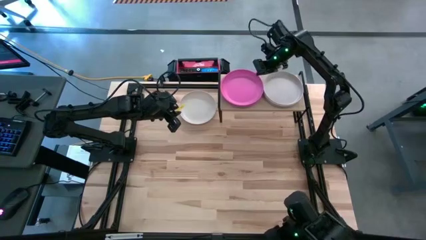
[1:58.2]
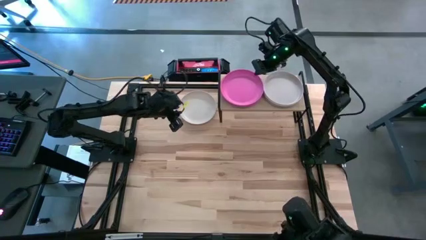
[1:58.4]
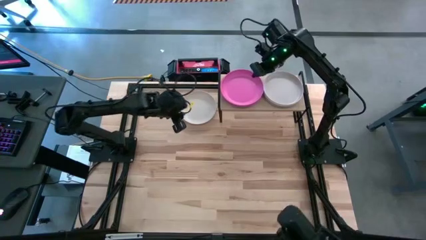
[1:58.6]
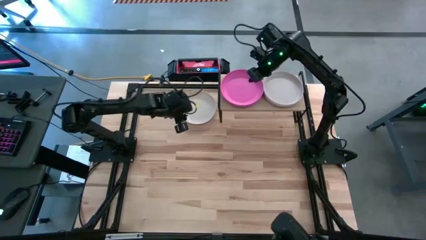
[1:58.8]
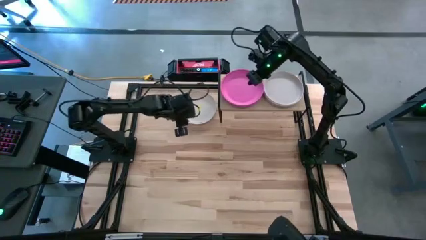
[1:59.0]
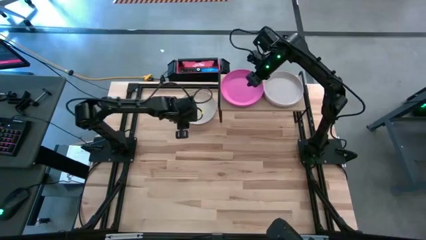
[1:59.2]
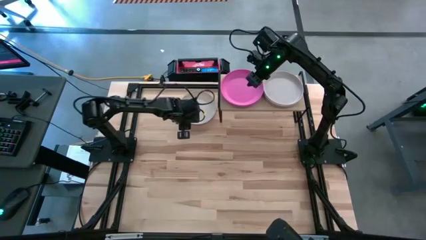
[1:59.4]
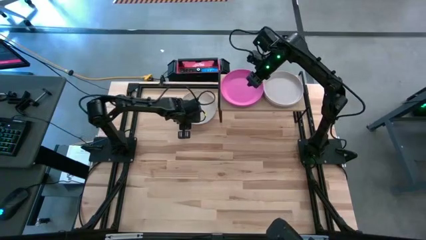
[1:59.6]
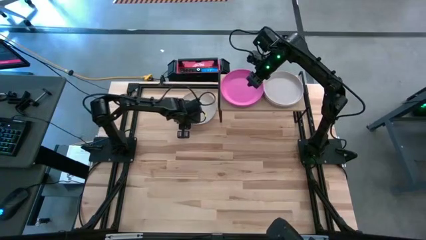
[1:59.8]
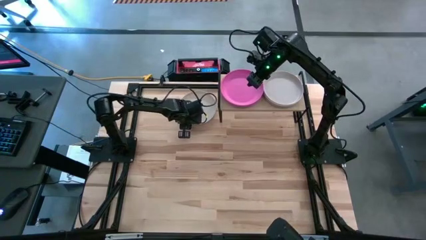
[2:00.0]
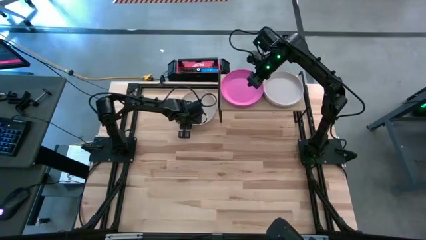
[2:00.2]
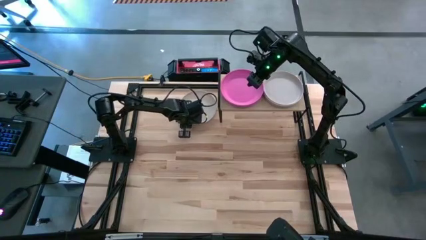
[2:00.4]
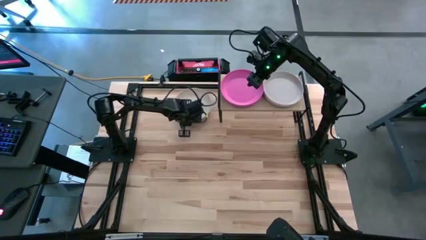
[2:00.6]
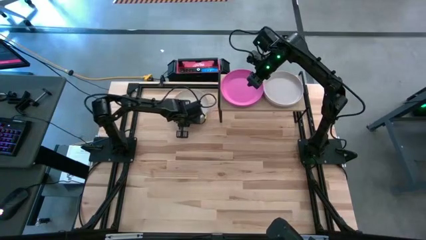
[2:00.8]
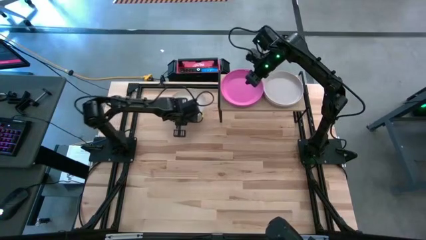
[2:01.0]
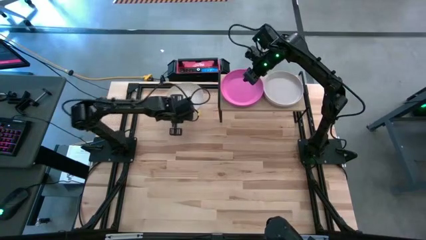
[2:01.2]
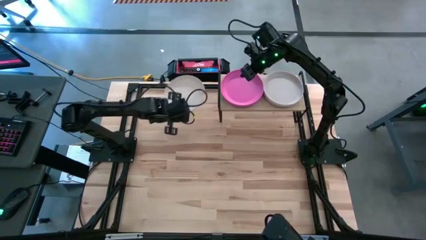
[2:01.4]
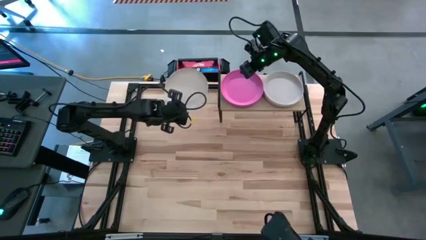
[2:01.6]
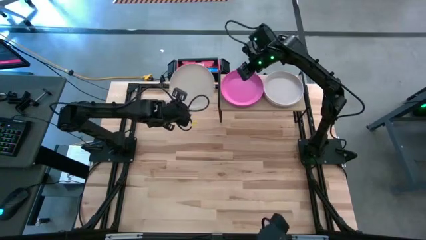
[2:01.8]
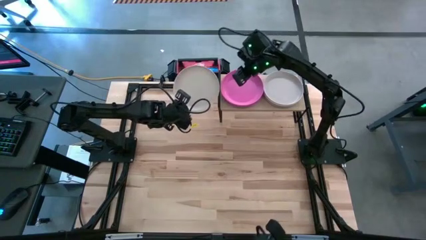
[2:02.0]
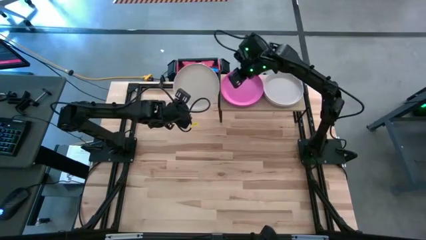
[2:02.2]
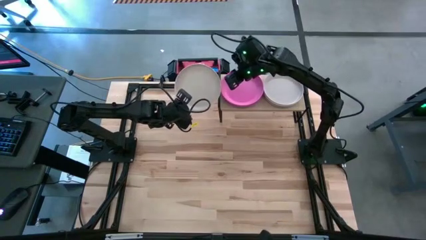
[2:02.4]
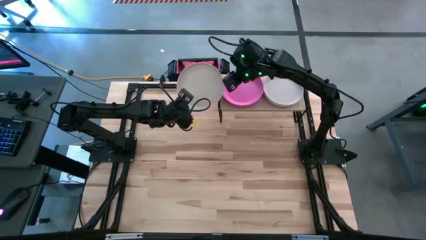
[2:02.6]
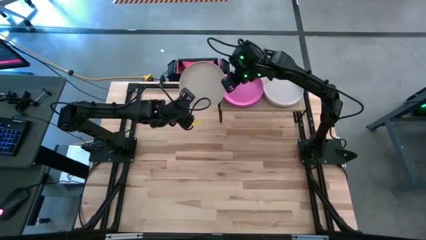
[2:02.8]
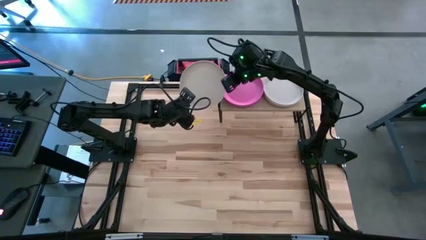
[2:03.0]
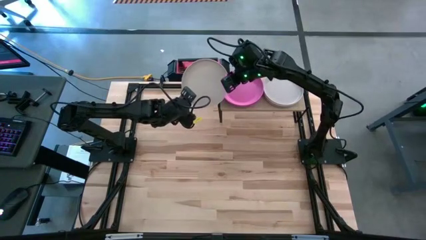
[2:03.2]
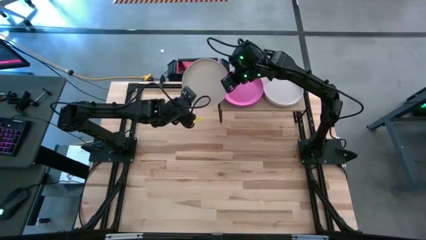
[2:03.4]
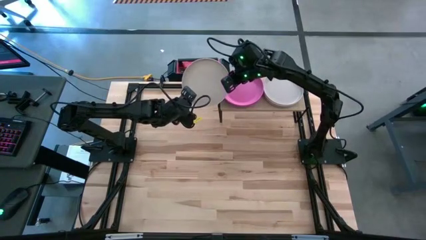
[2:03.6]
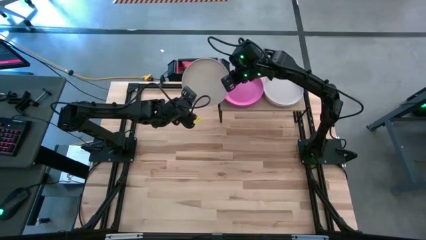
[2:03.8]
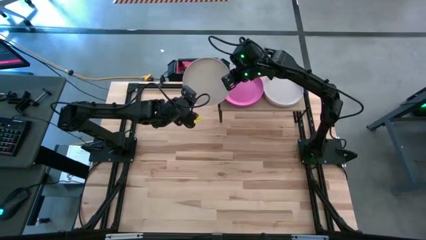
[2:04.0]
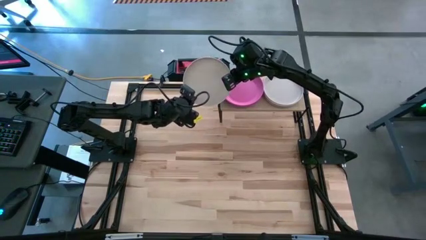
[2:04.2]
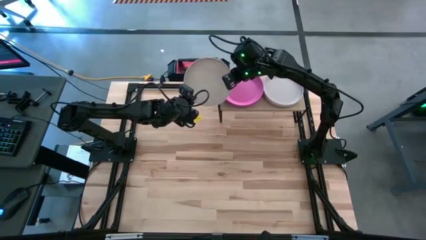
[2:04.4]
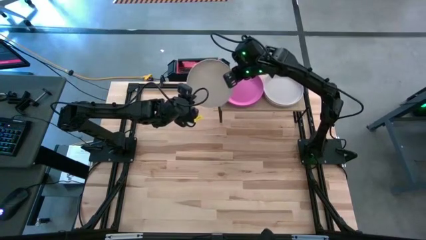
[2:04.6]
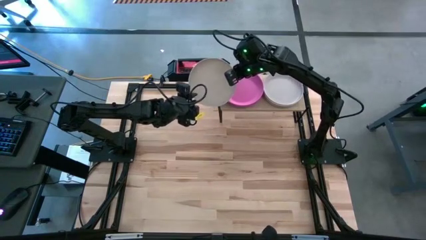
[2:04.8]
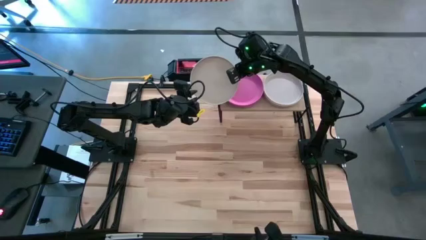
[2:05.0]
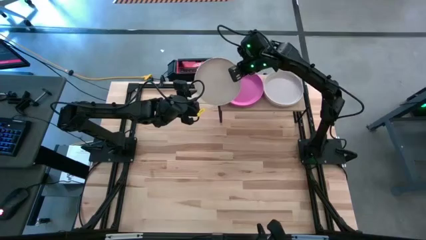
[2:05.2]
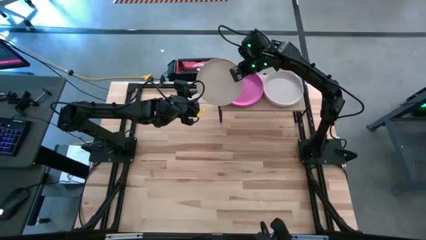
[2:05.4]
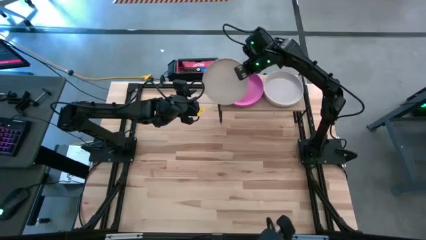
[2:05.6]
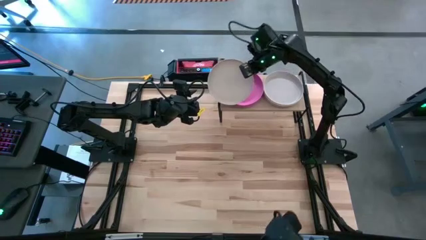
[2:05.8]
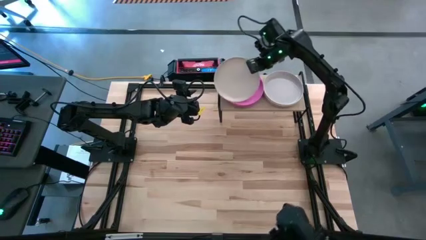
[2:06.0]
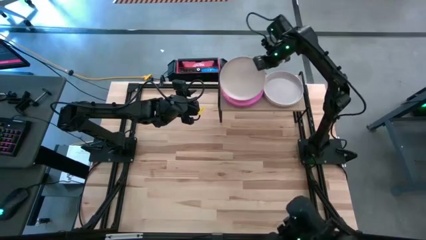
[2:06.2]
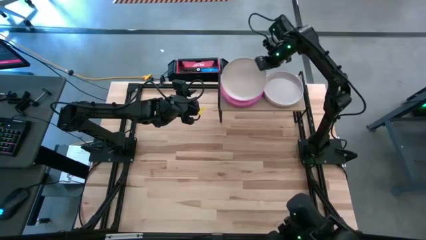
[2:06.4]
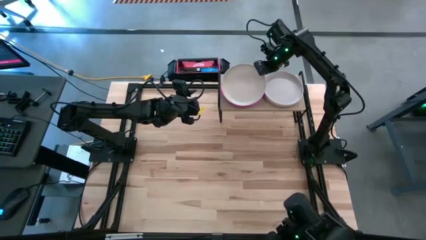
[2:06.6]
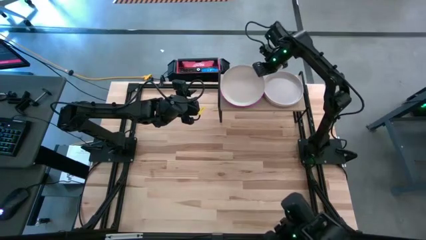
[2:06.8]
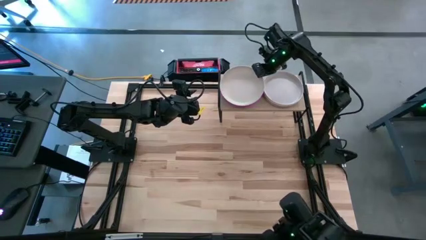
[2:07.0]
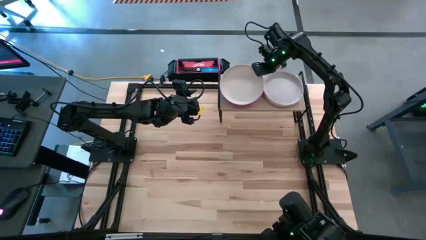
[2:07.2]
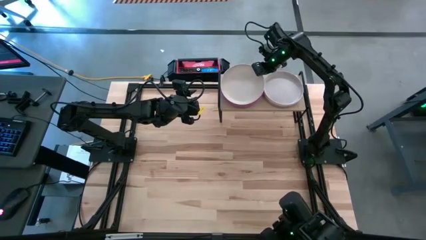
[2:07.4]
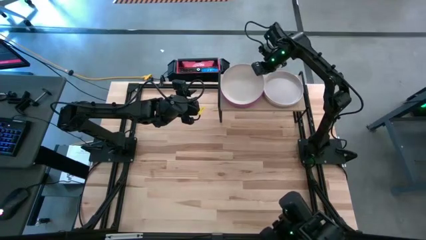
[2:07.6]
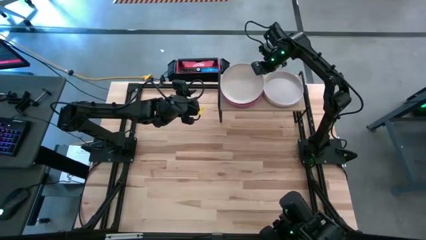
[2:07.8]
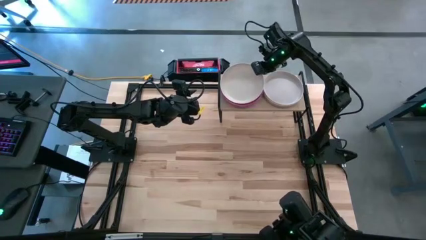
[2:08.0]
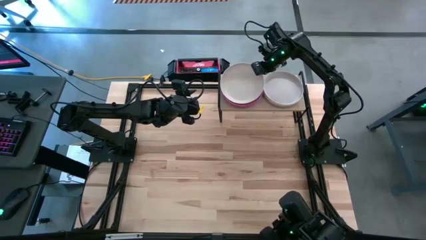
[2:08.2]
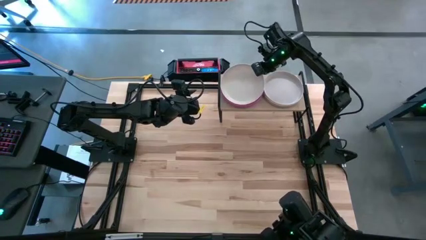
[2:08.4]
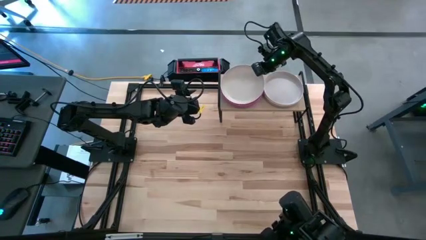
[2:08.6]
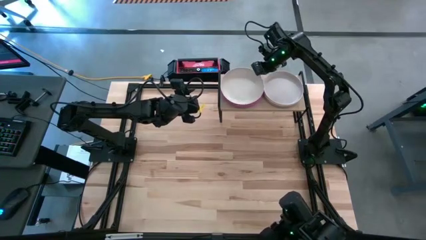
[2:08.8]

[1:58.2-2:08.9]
Task: Place and stack plates onto a shelf
Stack the white plate on top of the pink plate on the shelf

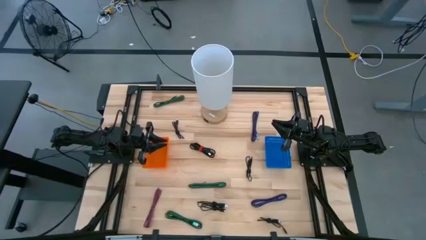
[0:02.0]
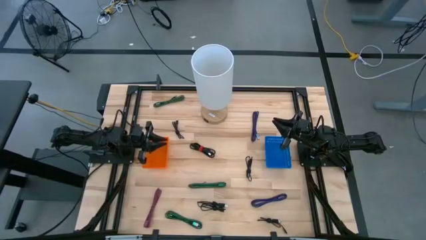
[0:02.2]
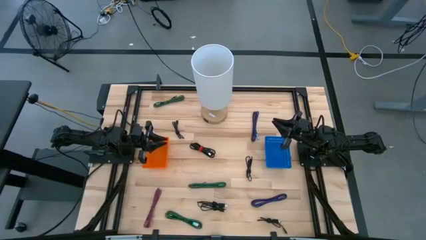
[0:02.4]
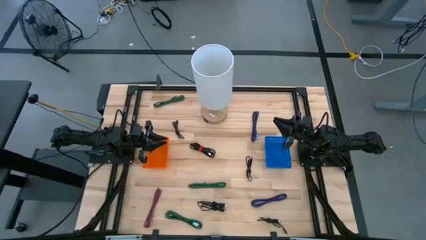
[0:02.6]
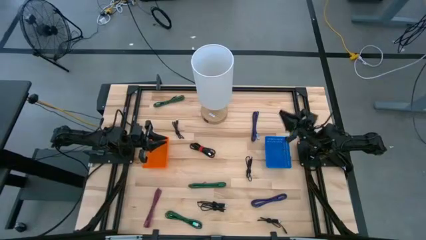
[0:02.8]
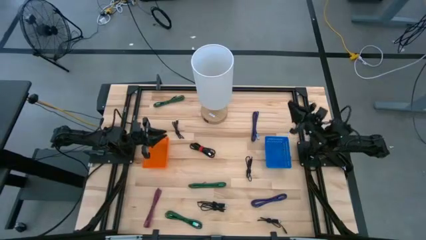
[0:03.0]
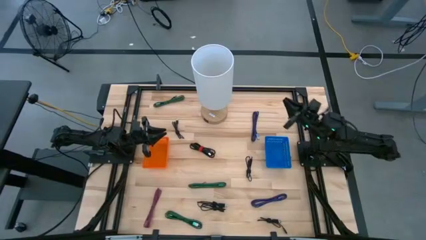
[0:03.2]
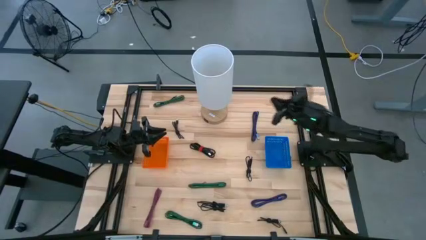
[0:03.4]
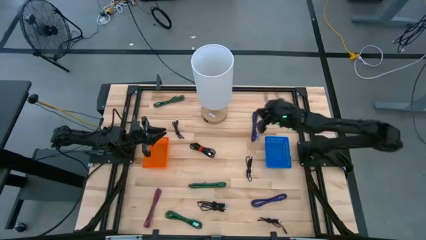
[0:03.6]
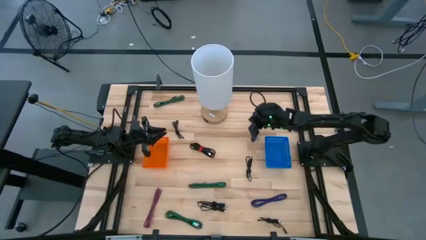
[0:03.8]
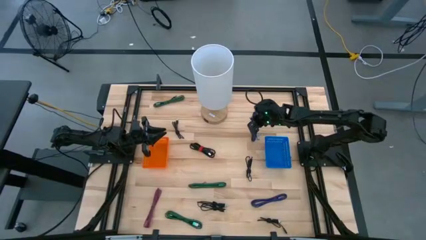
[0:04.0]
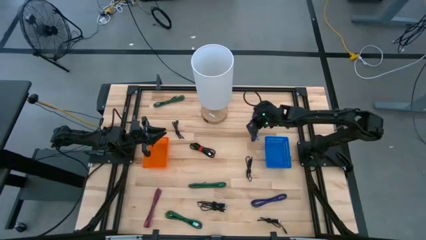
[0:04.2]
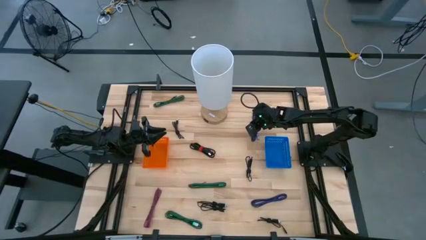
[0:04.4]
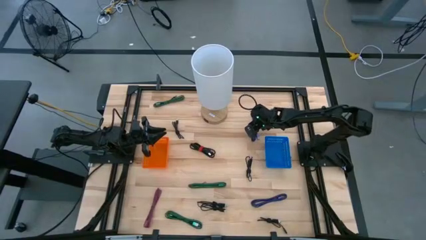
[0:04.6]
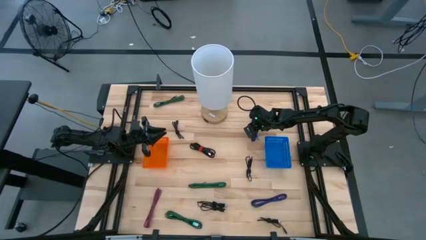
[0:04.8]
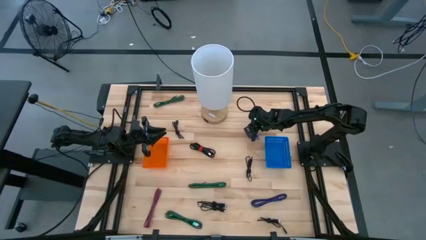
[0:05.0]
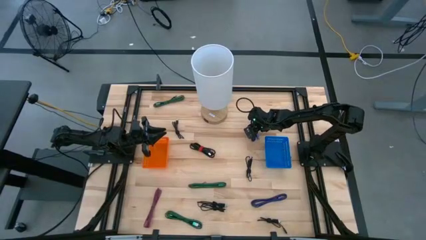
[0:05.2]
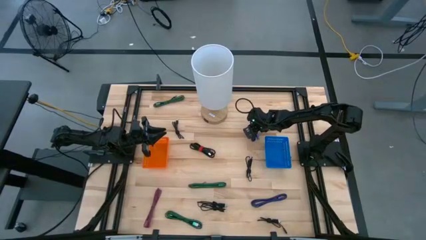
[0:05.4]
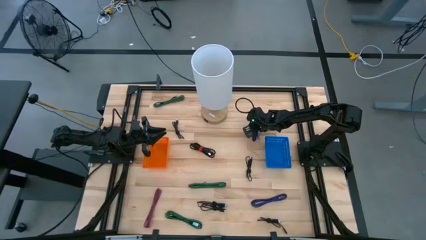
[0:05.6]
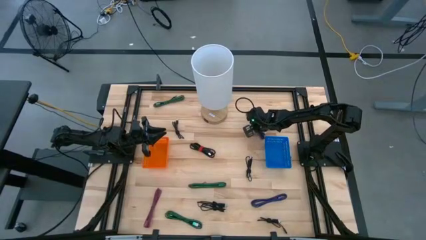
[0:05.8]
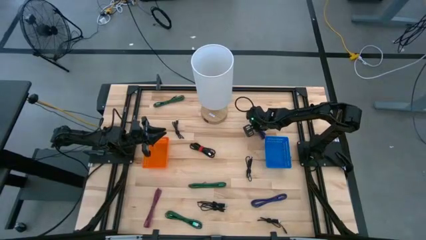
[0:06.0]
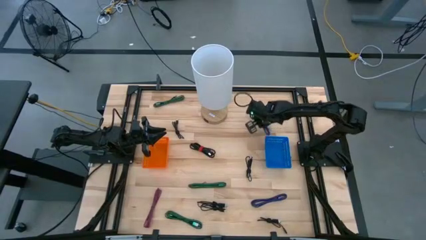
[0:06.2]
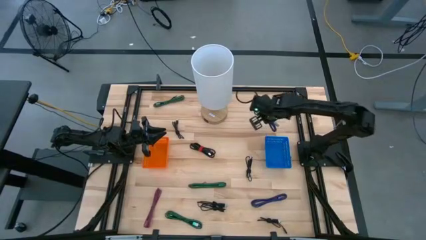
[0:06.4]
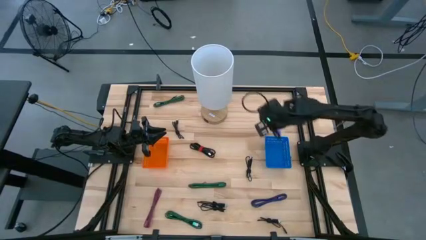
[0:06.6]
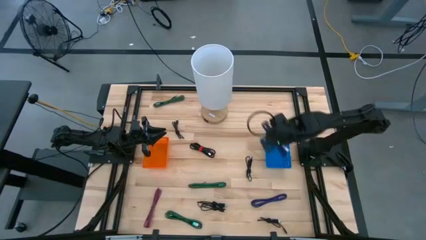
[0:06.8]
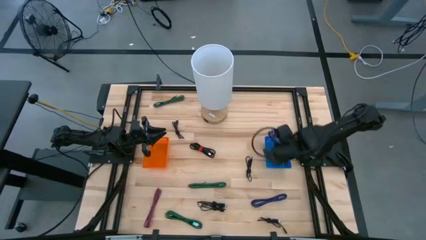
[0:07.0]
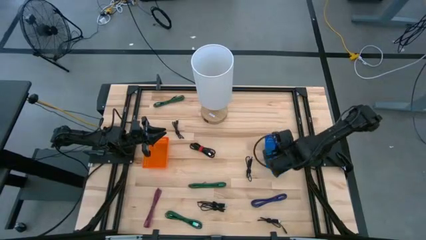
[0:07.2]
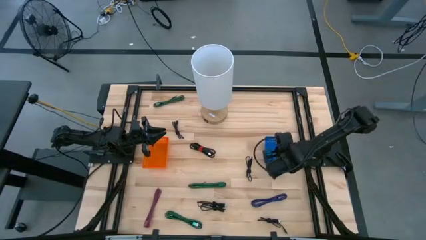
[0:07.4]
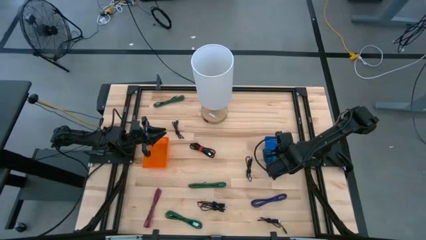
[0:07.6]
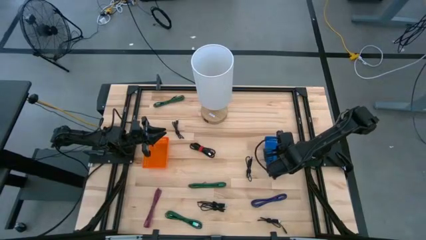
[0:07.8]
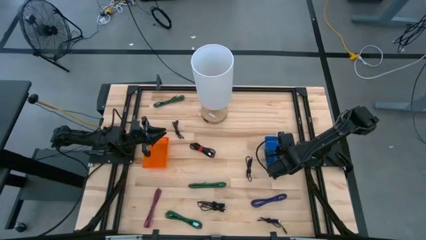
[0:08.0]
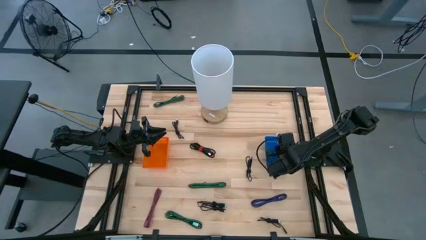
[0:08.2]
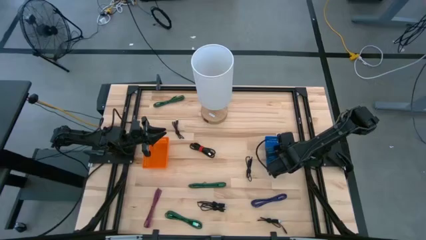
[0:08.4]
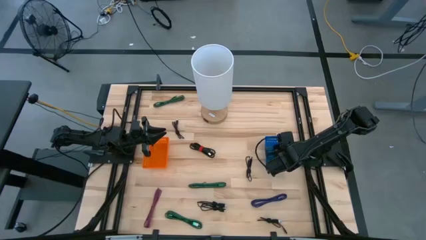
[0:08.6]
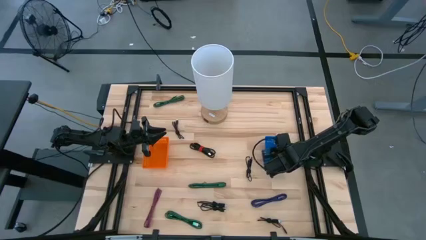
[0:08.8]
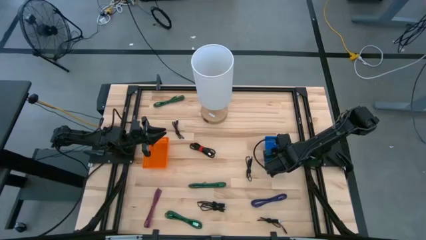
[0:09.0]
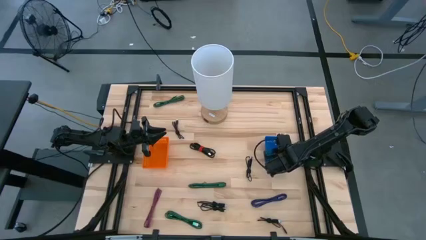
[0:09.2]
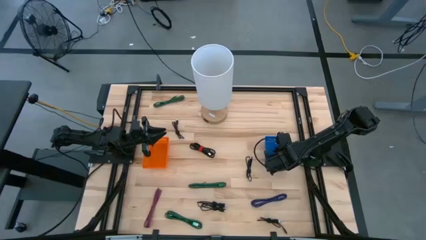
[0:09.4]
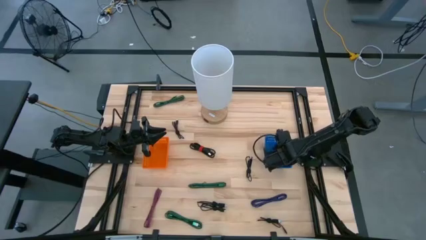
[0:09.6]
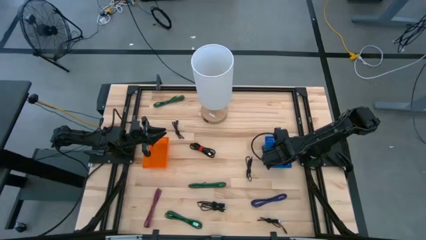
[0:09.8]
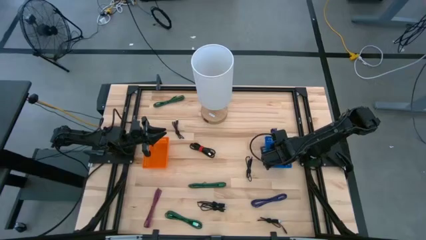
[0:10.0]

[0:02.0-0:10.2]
Task: Pick & Place USB Port
Put the purple charger cable into the blue bin
